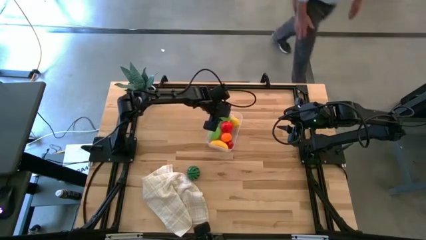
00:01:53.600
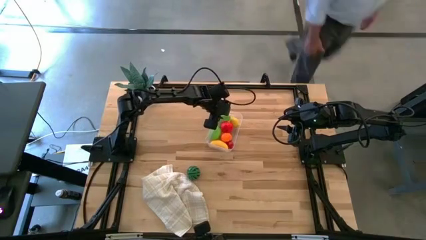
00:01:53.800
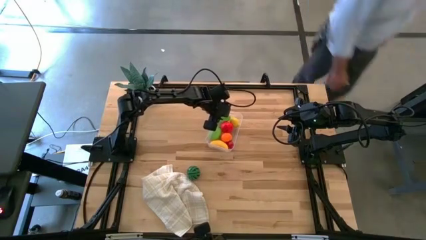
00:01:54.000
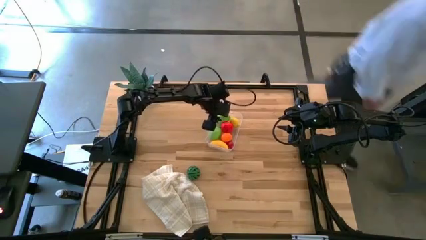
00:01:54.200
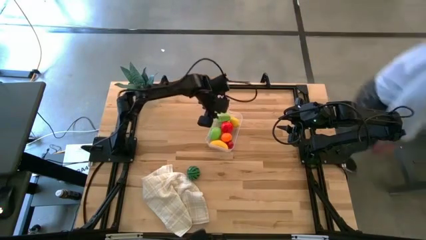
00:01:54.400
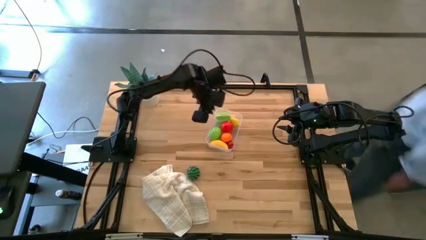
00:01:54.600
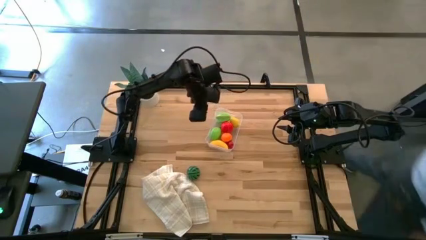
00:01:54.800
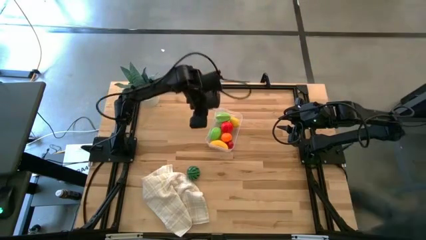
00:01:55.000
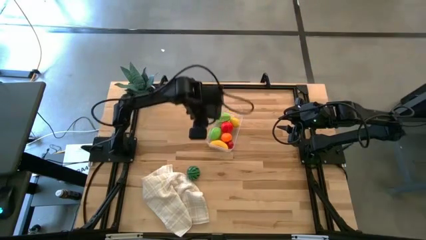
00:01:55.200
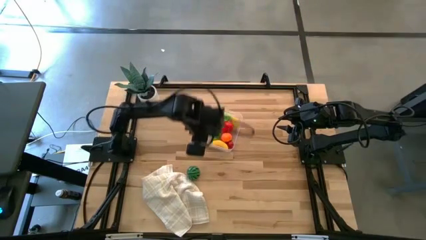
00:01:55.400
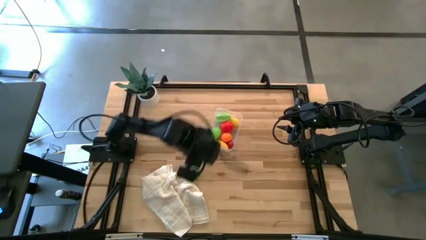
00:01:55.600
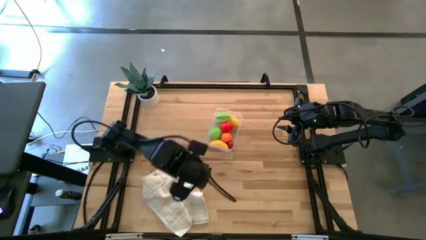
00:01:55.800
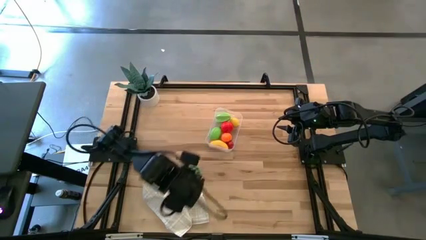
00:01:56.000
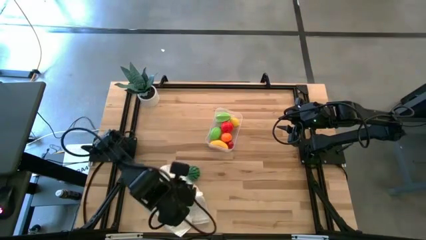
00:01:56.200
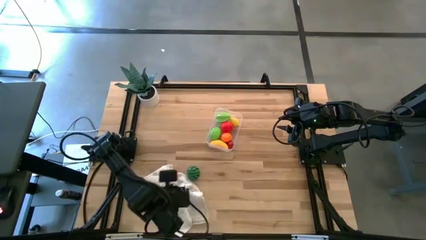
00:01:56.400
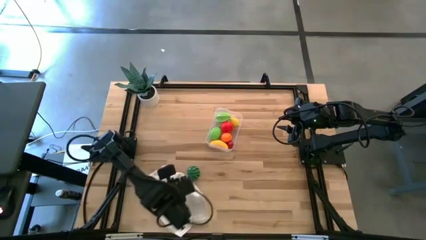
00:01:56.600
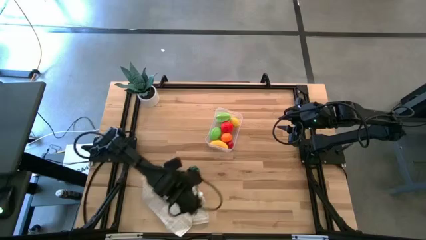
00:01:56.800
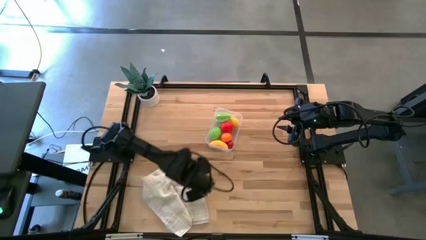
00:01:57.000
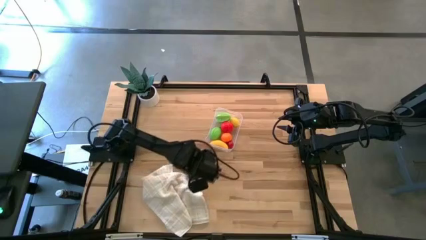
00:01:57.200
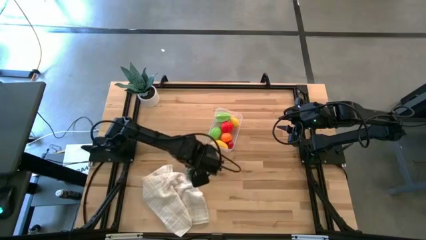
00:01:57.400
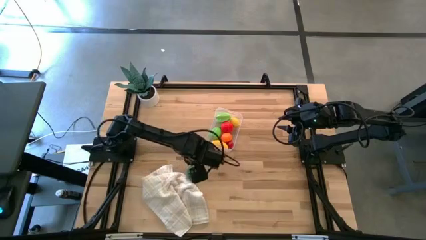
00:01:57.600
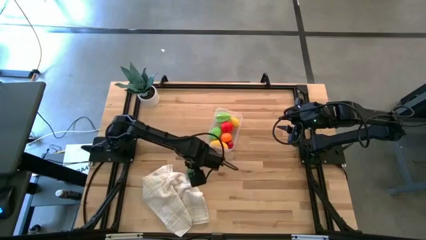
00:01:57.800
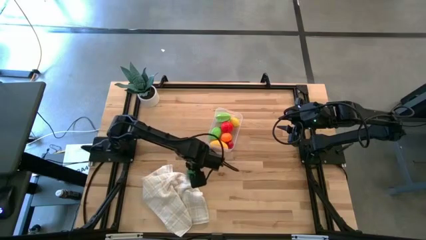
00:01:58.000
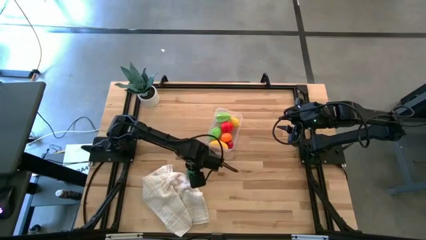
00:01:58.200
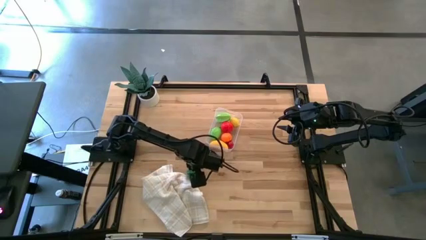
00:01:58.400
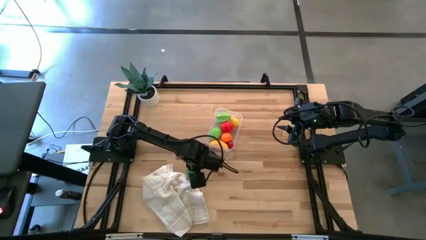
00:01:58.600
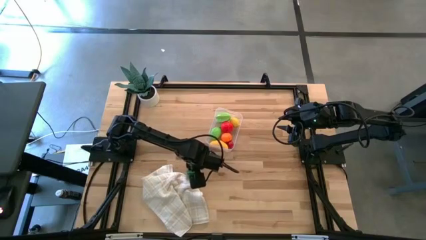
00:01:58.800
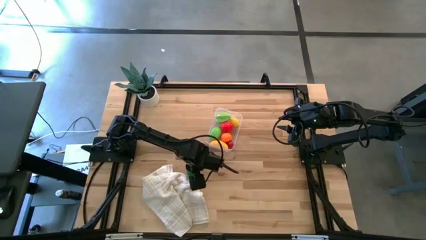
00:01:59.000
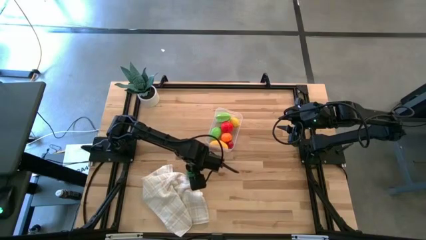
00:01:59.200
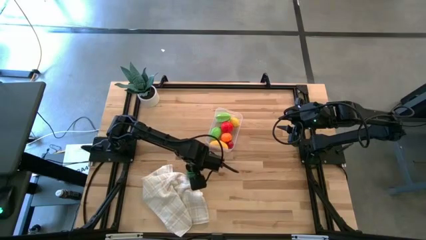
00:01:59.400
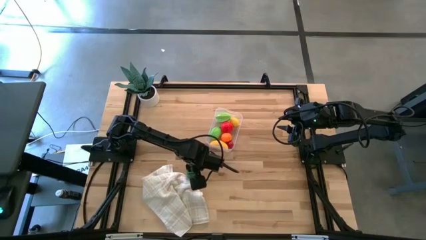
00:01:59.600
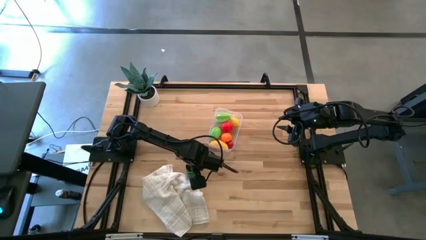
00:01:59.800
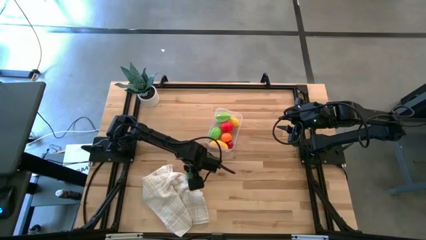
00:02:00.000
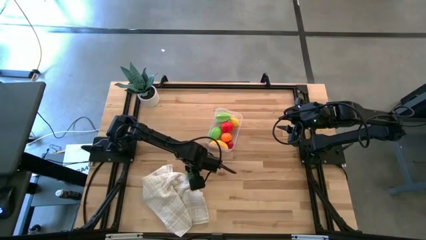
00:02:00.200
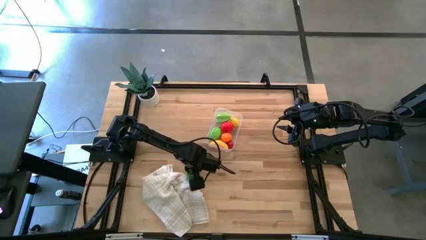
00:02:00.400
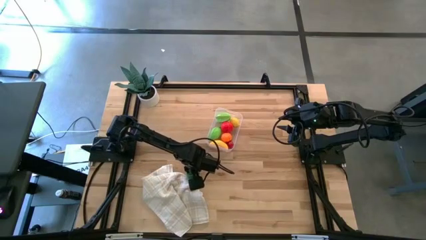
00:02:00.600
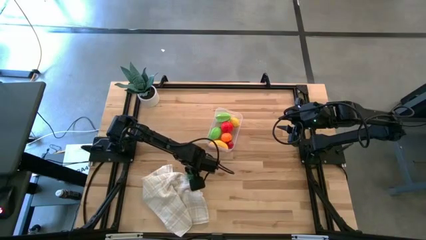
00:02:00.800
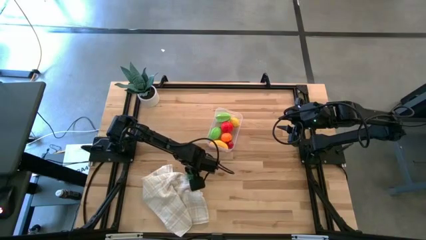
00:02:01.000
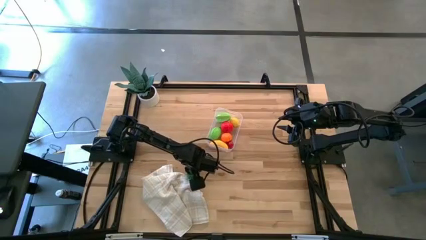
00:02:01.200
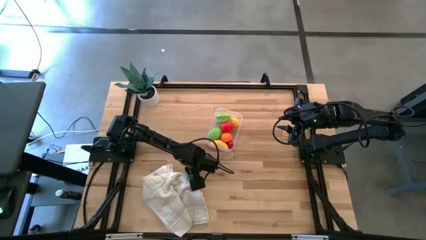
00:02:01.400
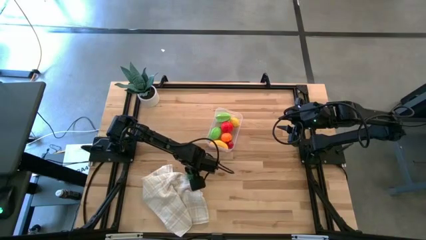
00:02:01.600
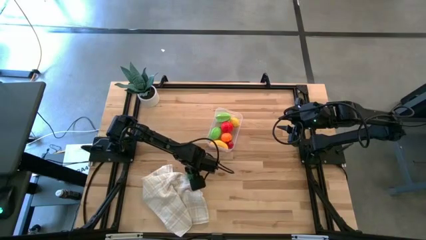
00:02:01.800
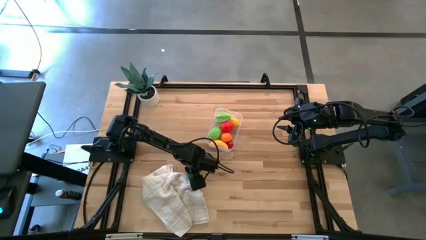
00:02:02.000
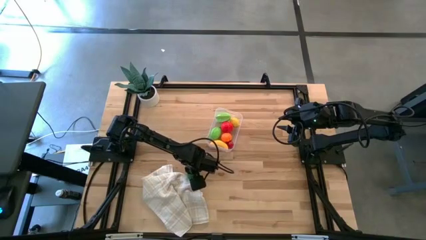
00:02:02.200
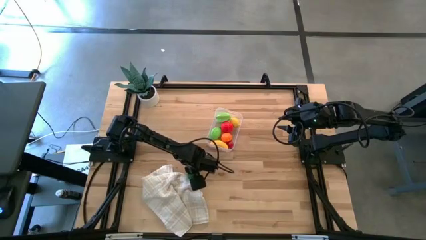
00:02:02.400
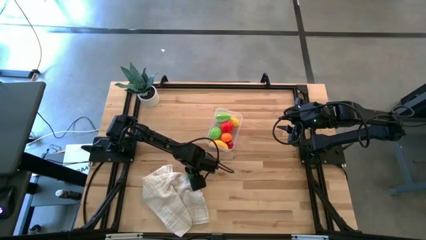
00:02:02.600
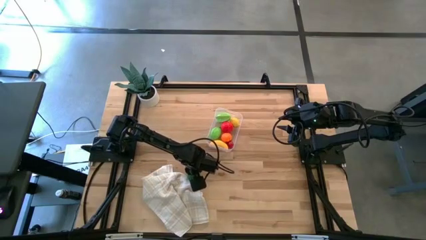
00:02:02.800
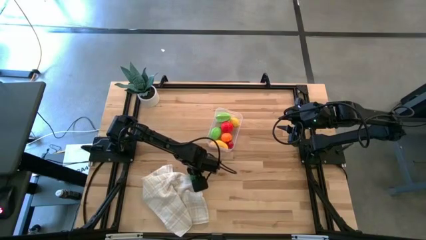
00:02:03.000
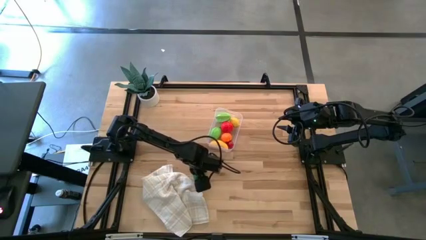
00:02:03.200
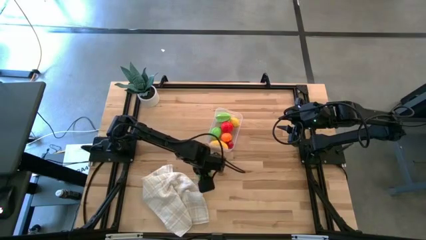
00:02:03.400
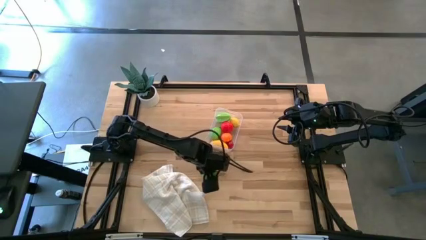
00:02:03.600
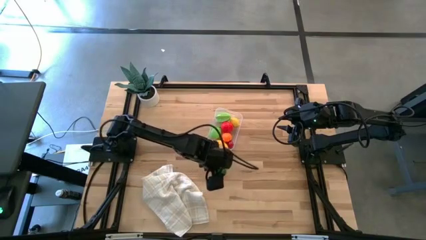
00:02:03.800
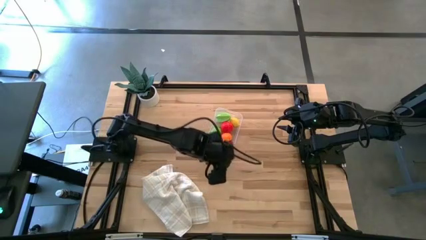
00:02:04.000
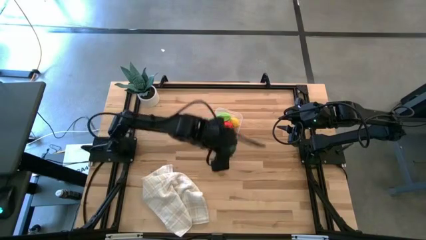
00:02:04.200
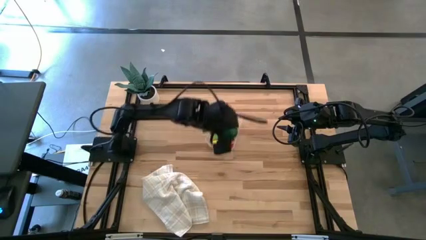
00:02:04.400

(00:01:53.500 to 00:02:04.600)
Task: Pick and placing Produce into tupperware
Put the green watermelon into the transparent bin
